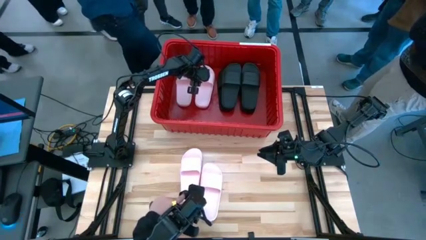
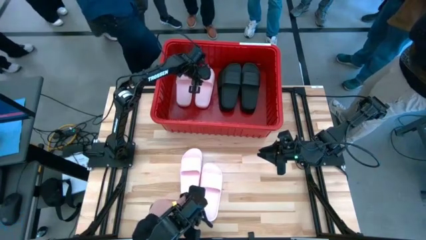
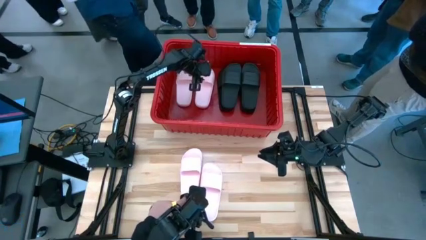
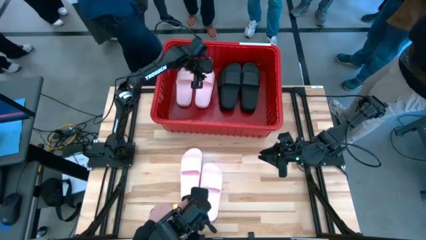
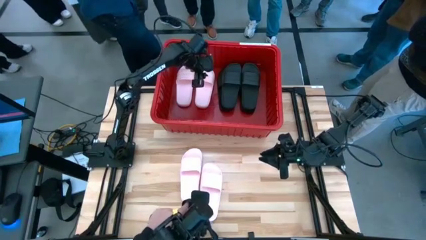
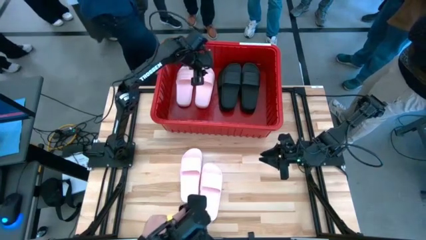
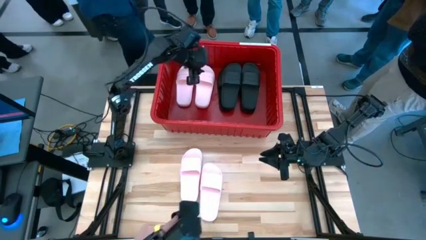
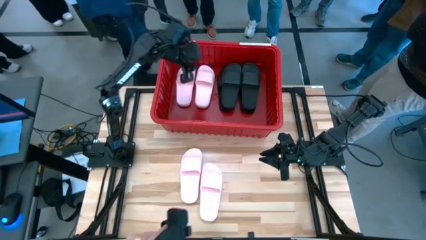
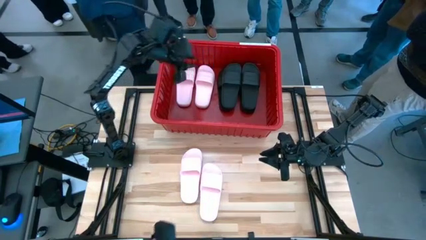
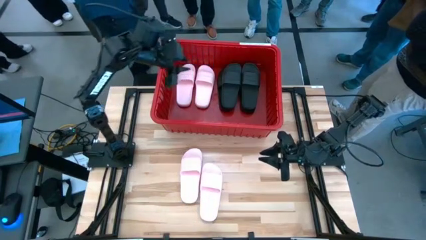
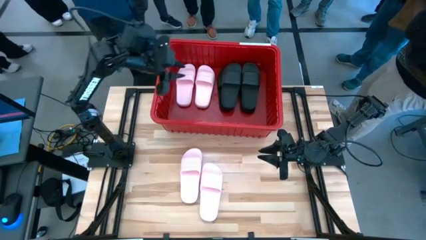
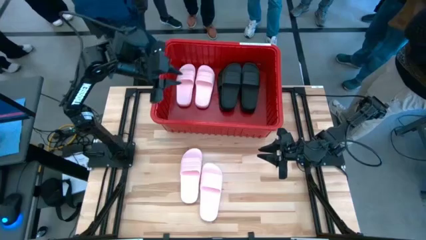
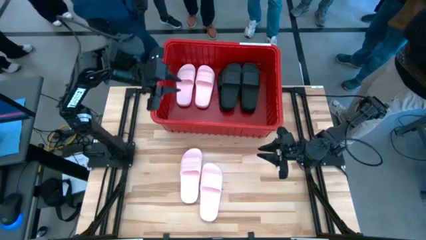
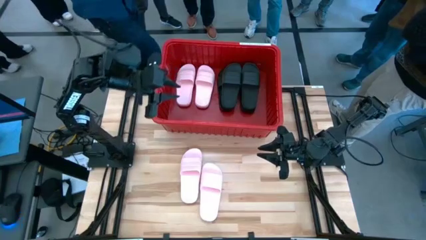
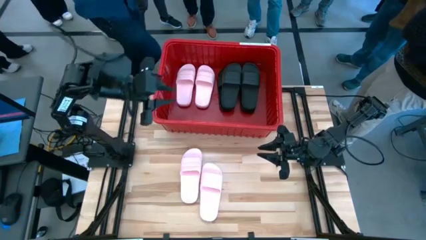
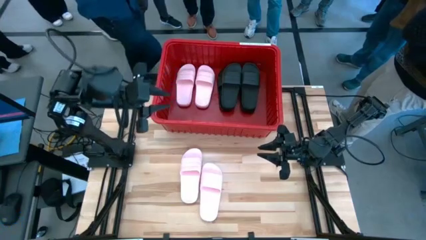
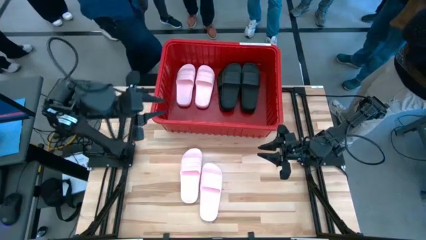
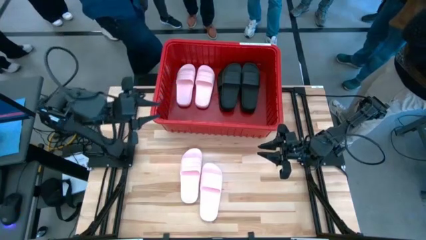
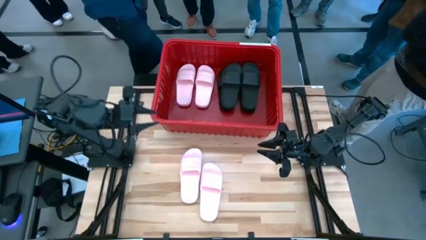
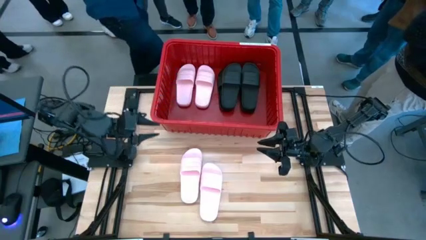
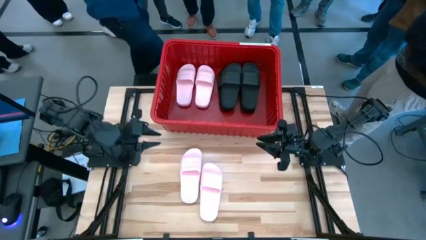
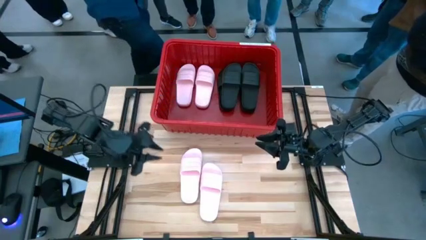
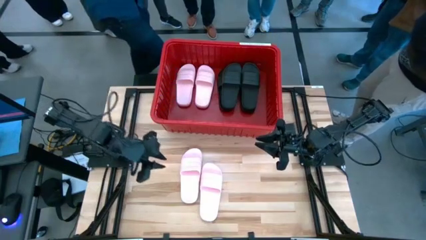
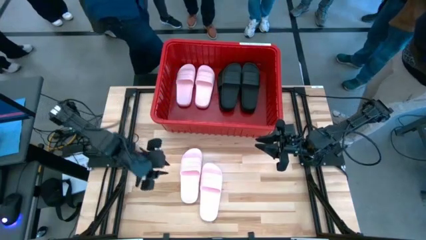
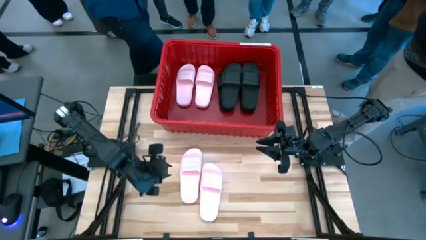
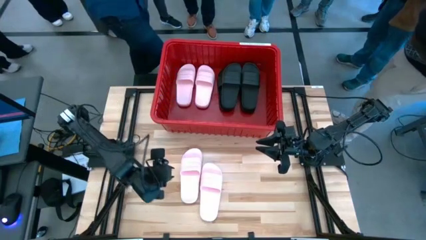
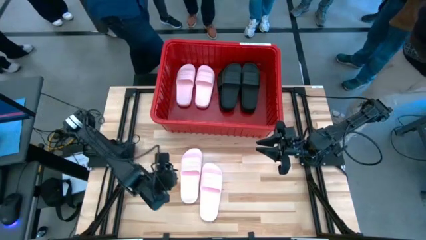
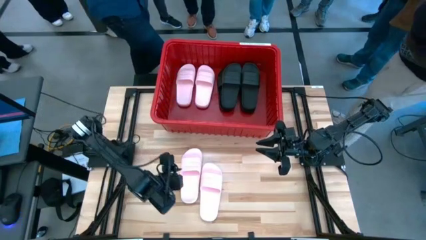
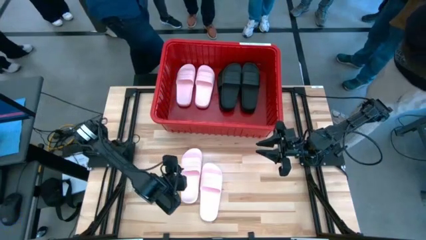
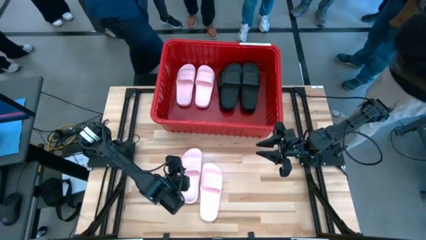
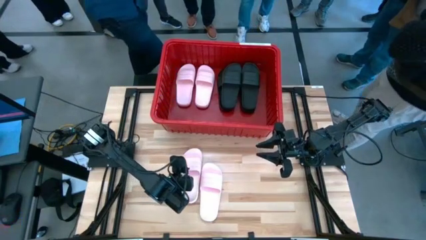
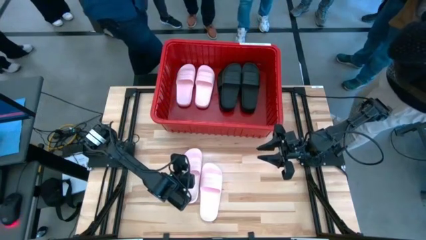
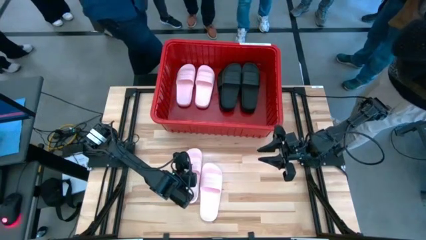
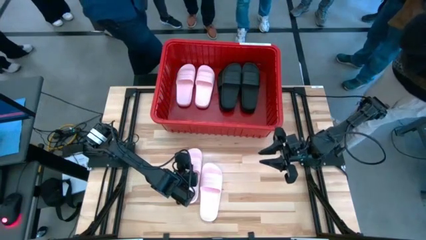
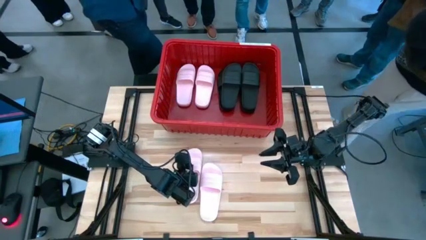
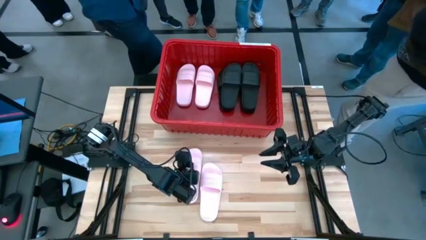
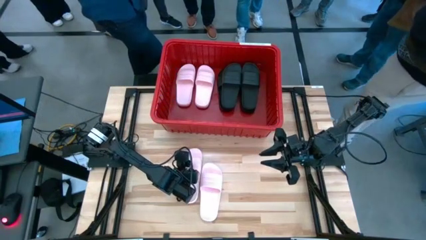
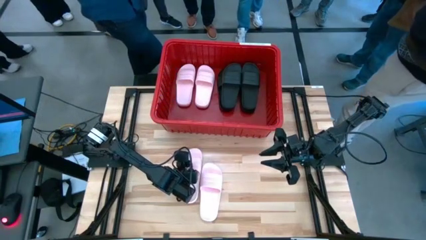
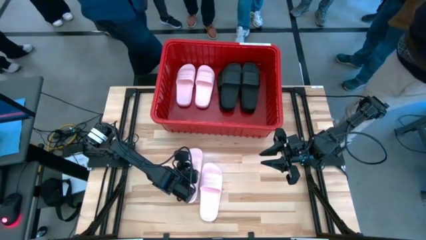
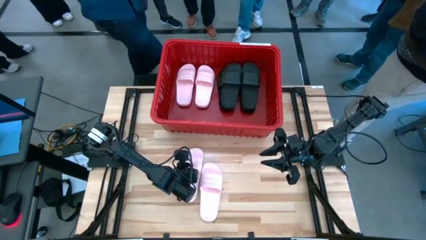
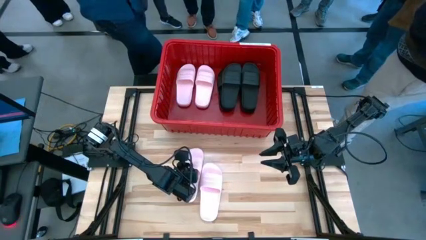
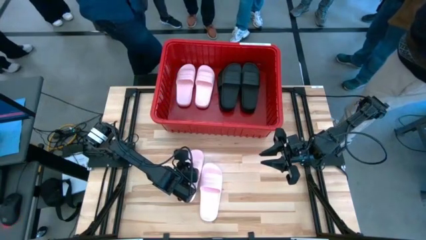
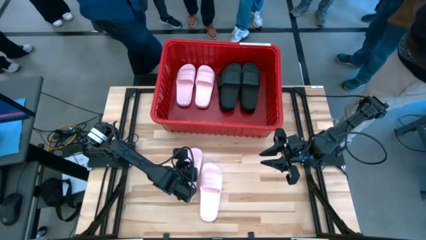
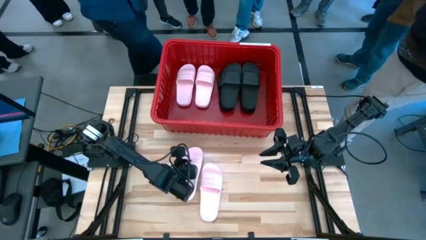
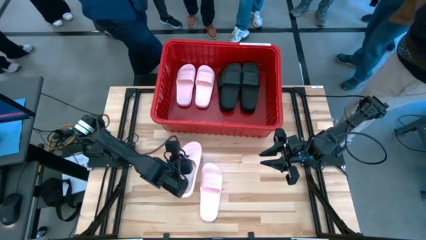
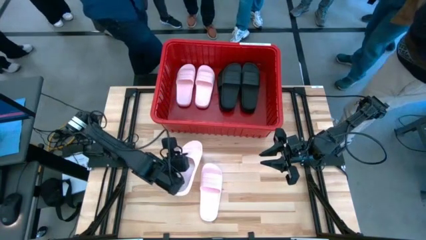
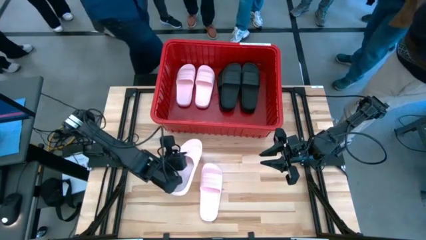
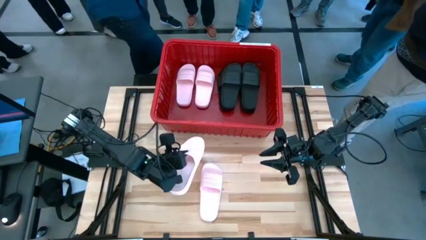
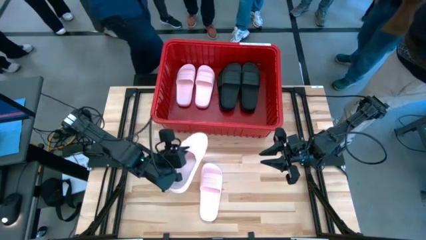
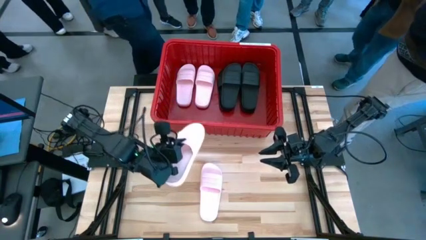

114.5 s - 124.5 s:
Task: Pick and place slides into bin
Put the pink slide into the red container

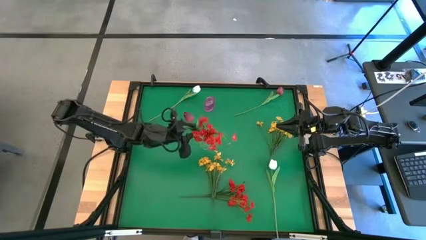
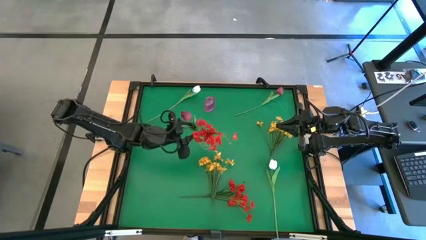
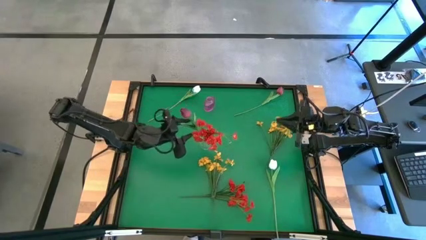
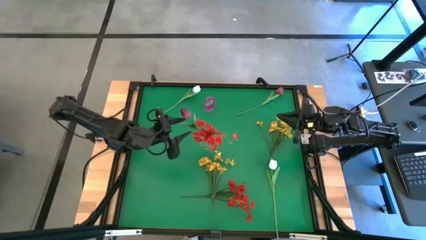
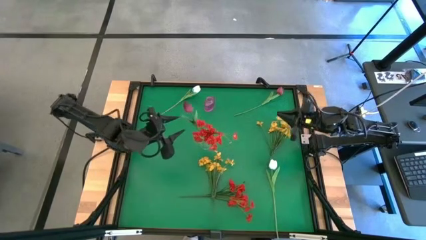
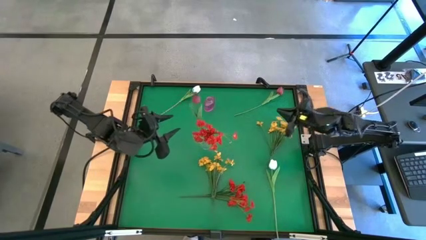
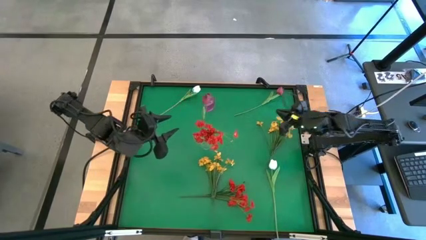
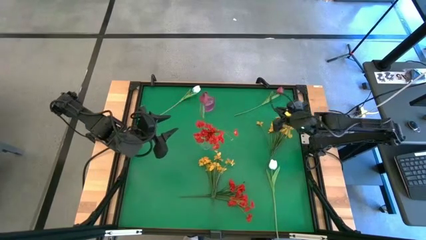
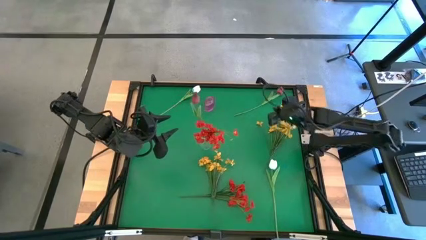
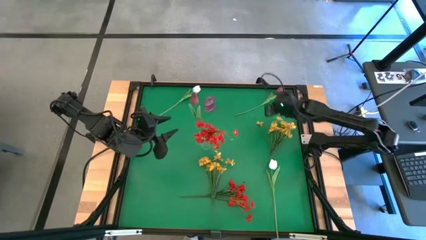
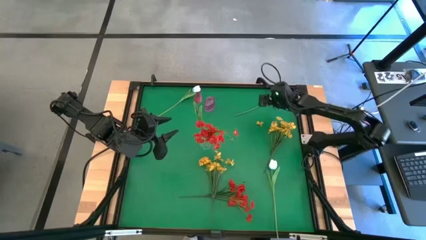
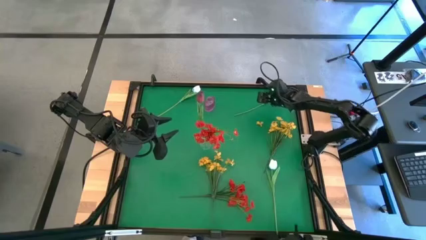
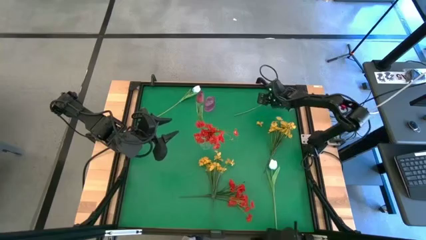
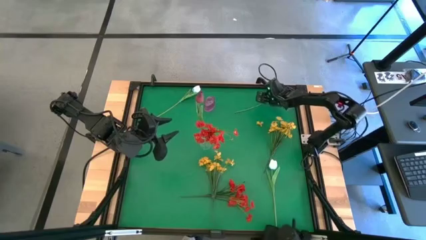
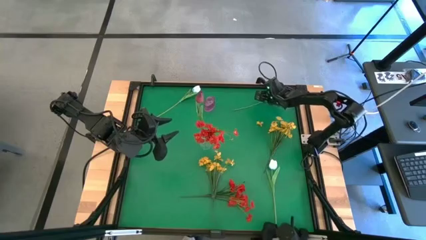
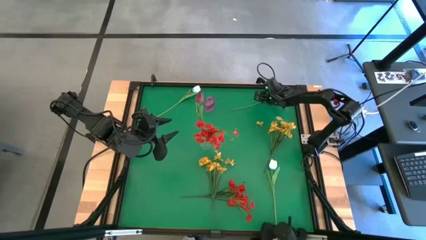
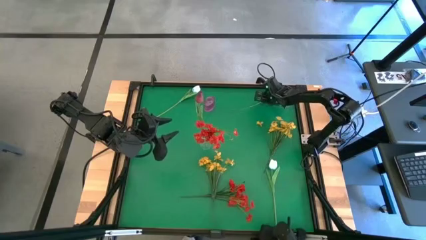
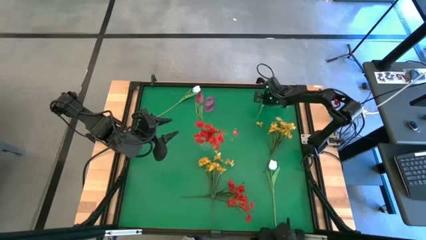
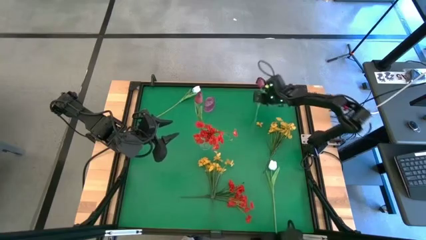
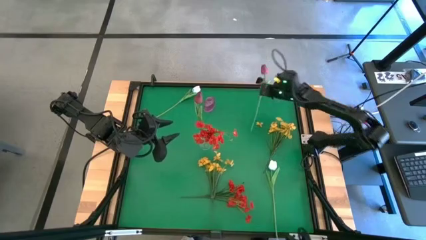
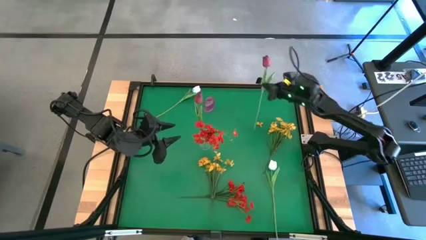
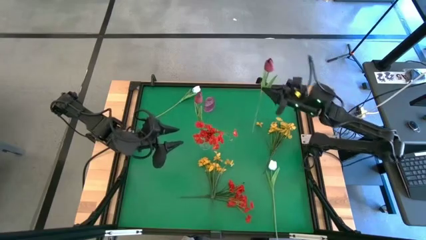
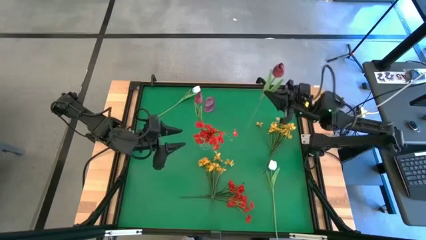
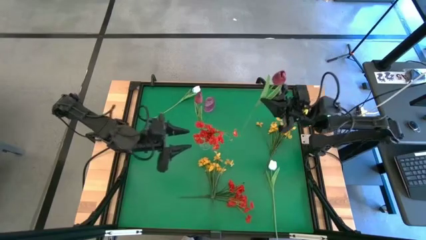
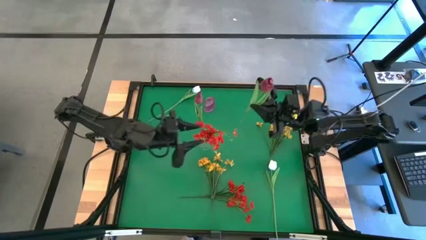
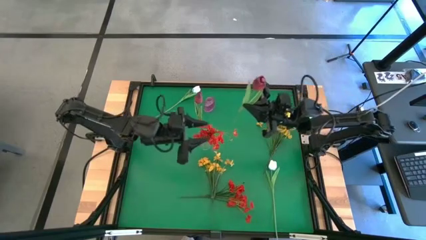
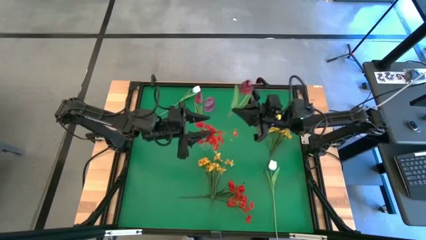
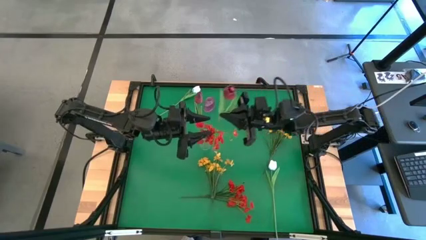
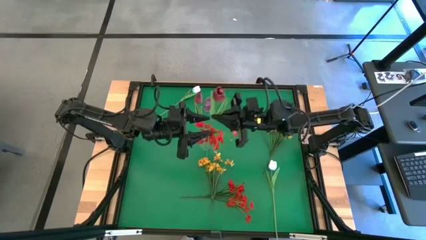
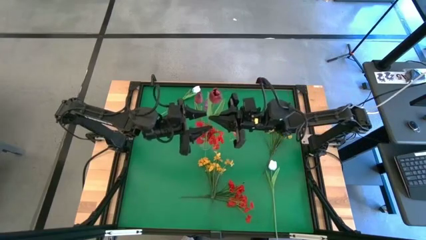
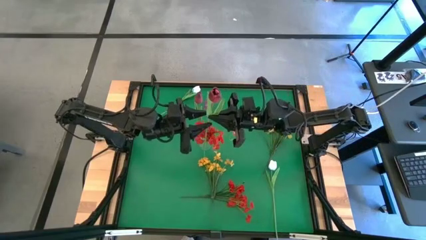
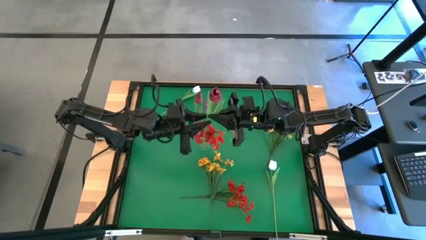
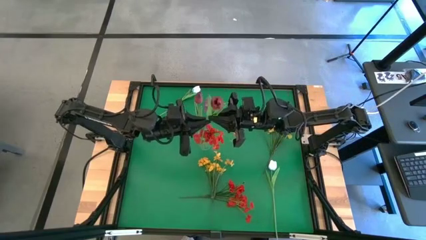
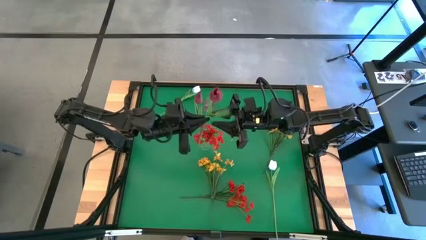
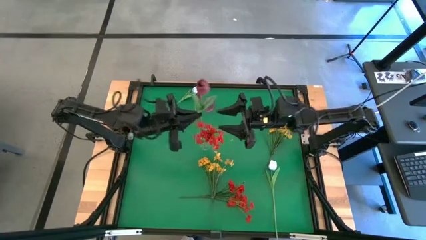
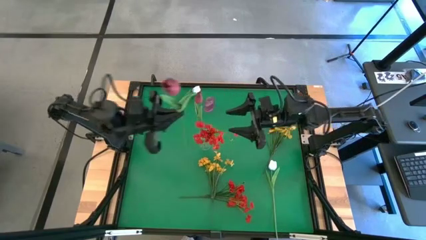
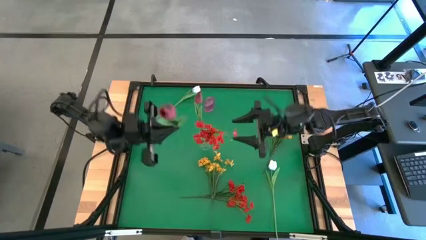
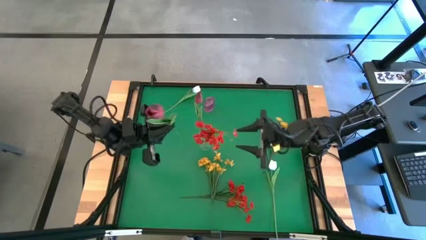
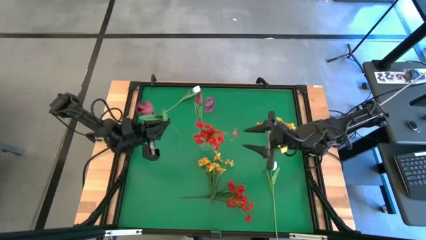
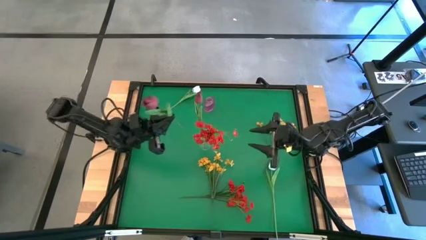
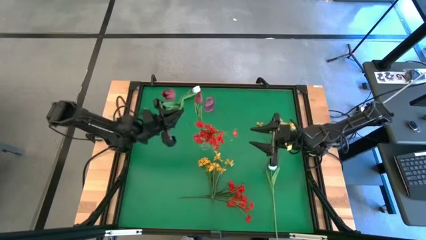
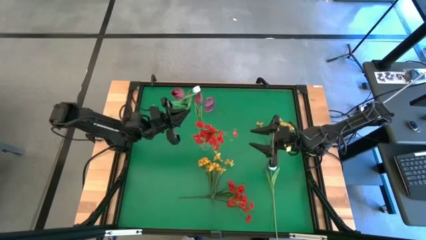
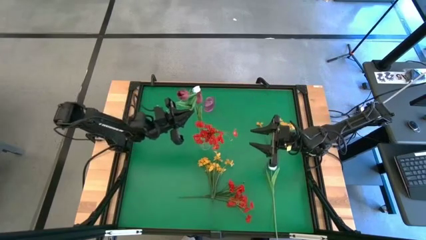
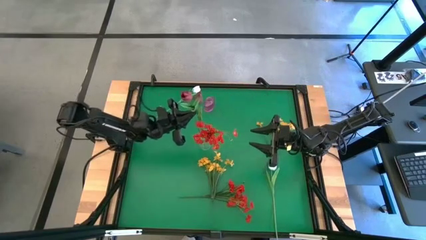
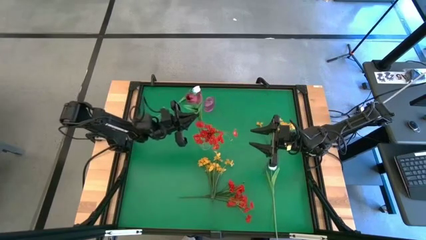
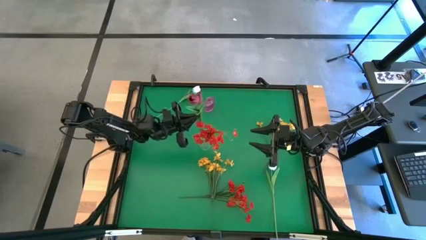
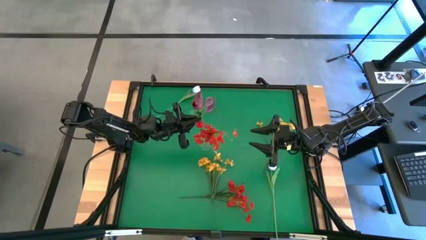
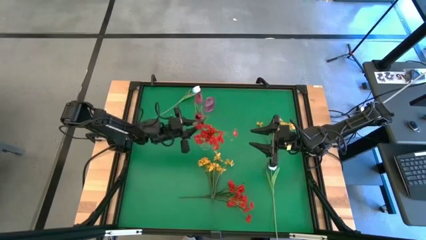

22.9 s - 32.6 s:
Task: Sort flowers into vase by color
Put the reddish pink flower into the transparent vase
